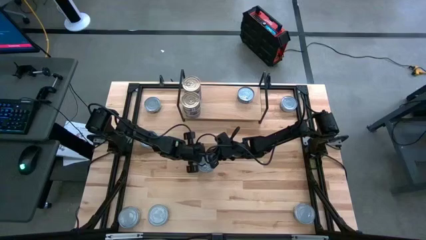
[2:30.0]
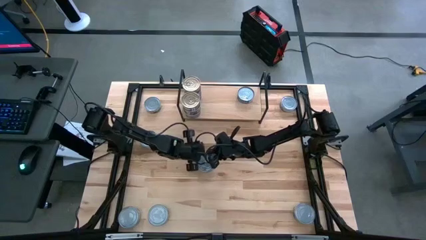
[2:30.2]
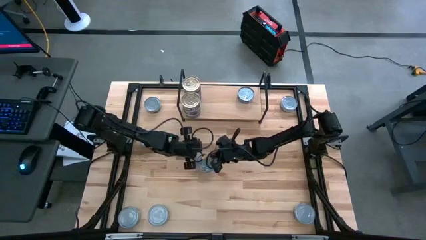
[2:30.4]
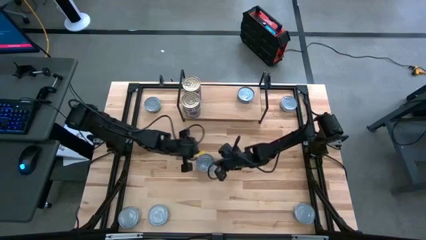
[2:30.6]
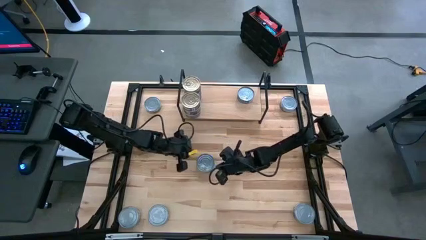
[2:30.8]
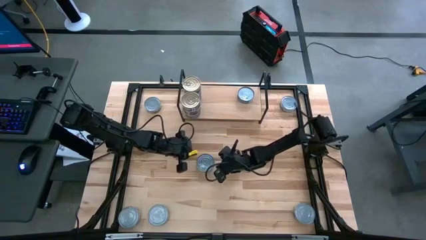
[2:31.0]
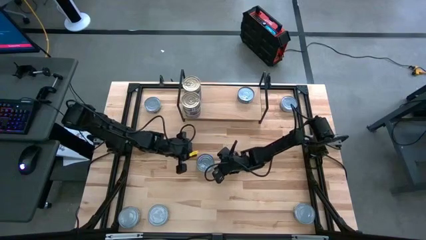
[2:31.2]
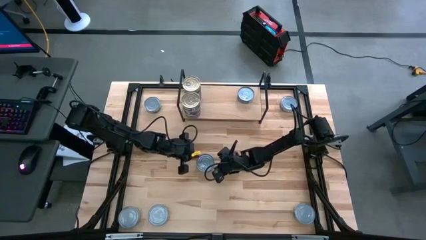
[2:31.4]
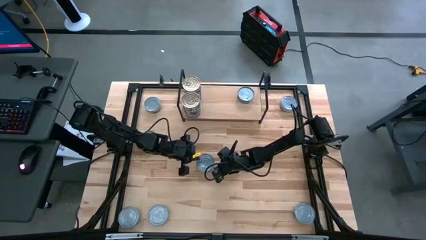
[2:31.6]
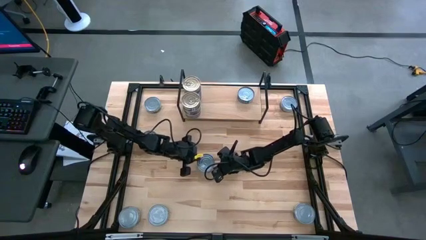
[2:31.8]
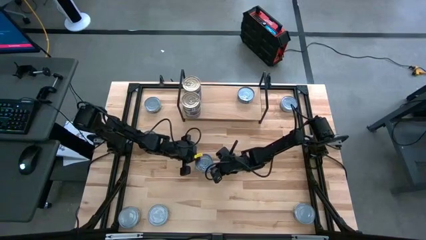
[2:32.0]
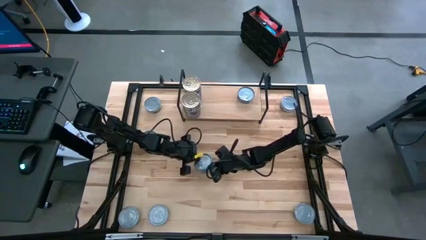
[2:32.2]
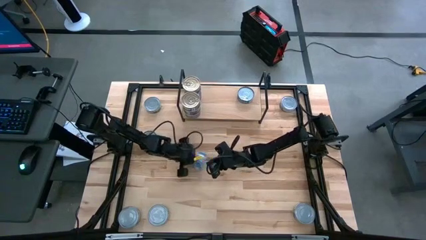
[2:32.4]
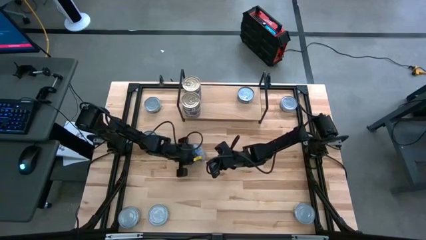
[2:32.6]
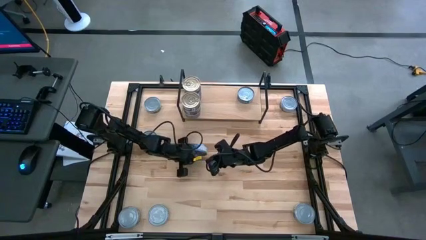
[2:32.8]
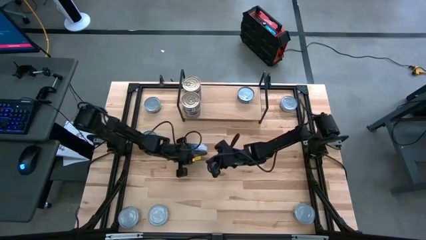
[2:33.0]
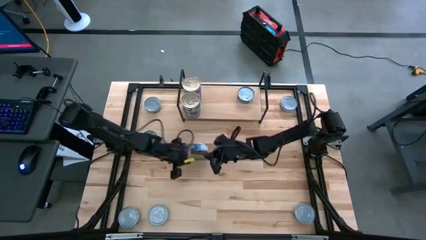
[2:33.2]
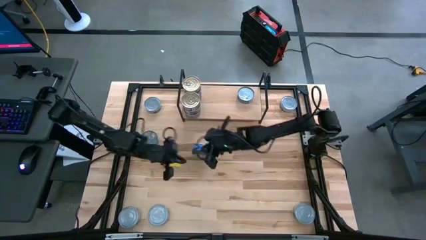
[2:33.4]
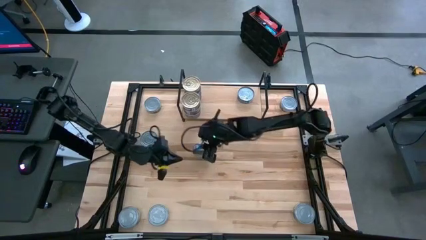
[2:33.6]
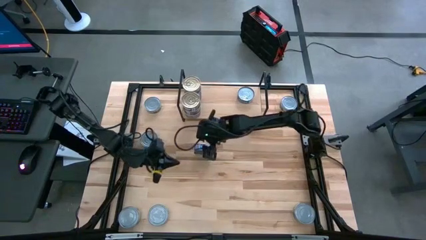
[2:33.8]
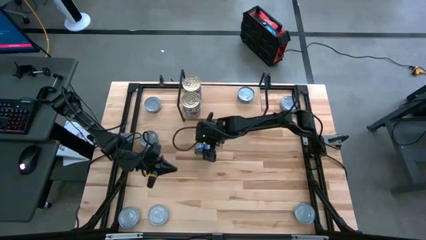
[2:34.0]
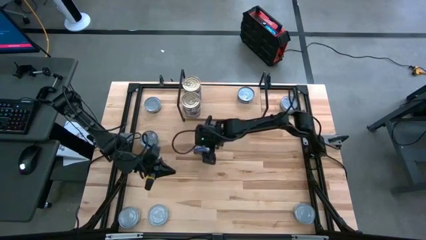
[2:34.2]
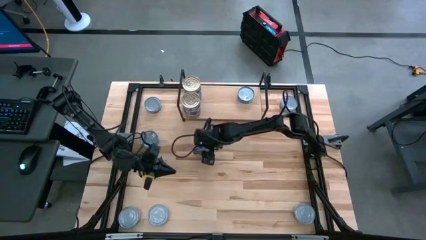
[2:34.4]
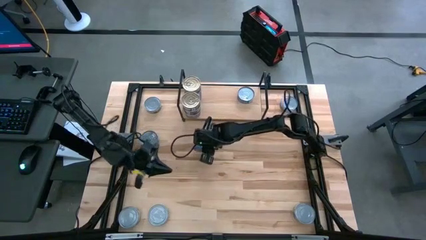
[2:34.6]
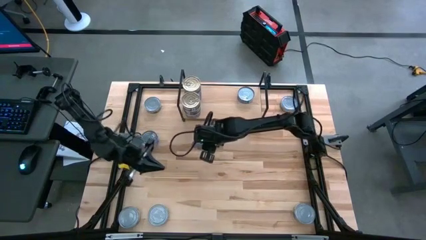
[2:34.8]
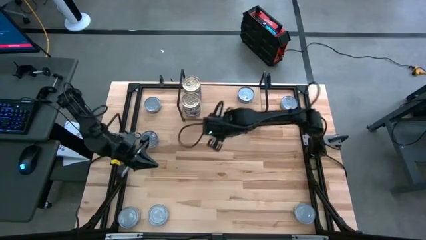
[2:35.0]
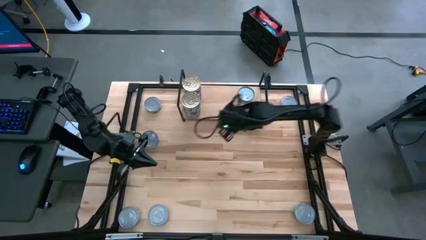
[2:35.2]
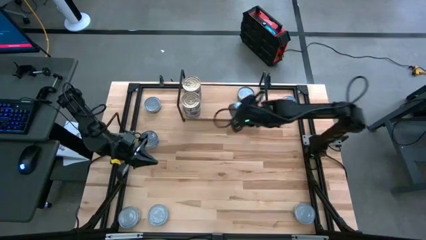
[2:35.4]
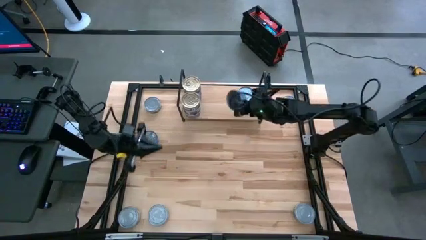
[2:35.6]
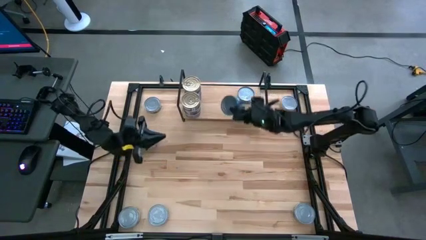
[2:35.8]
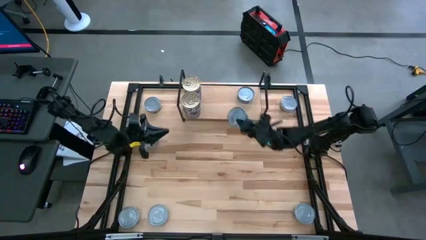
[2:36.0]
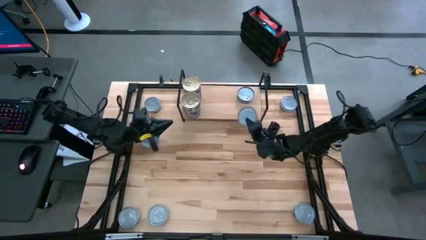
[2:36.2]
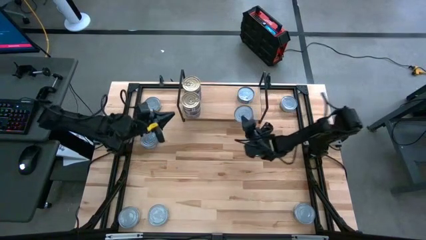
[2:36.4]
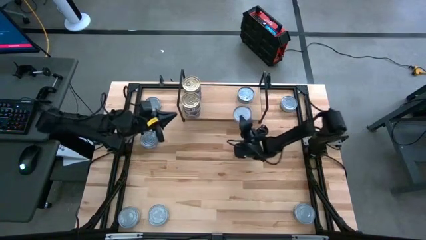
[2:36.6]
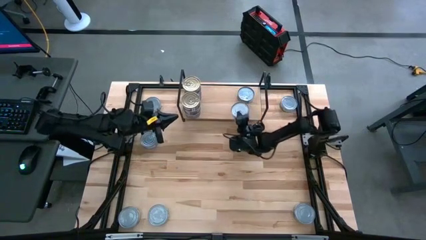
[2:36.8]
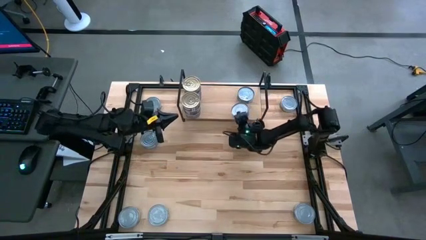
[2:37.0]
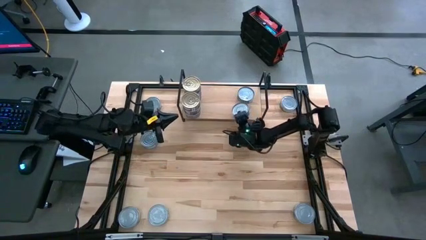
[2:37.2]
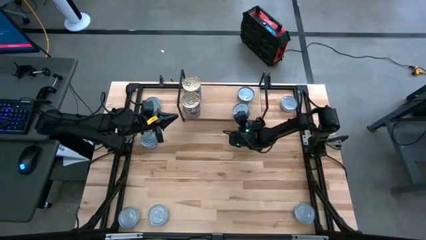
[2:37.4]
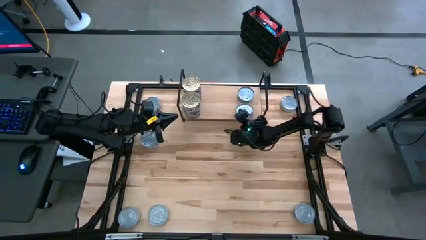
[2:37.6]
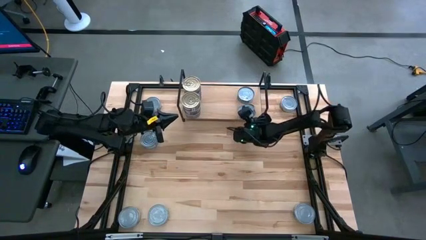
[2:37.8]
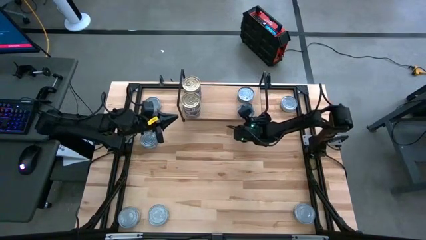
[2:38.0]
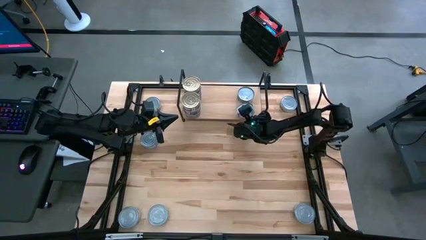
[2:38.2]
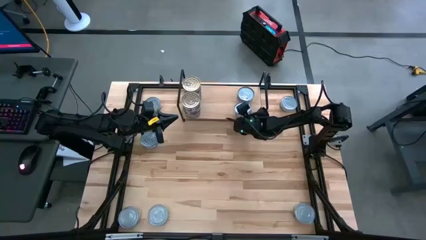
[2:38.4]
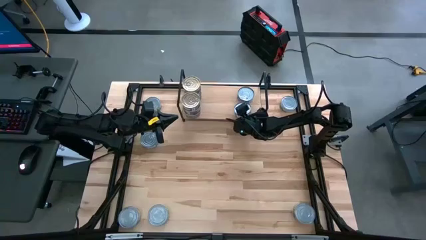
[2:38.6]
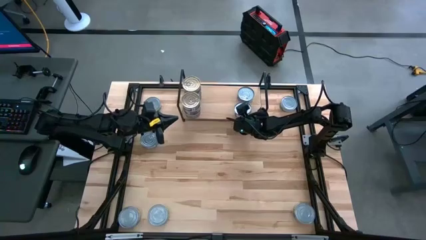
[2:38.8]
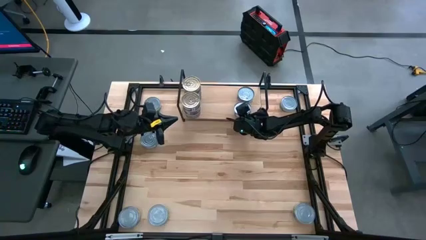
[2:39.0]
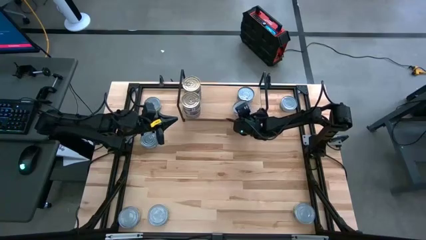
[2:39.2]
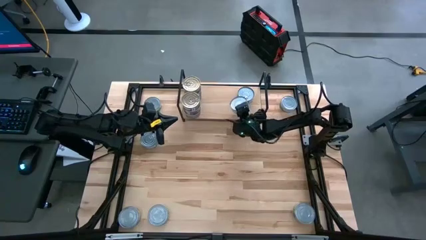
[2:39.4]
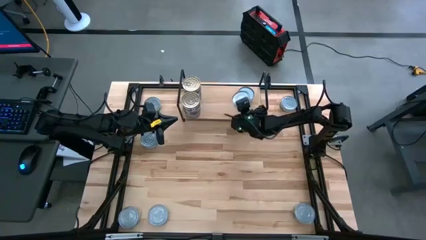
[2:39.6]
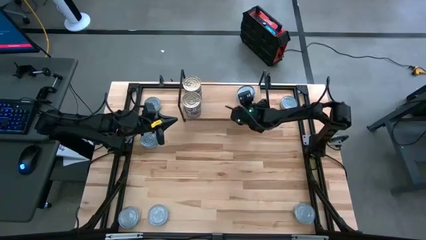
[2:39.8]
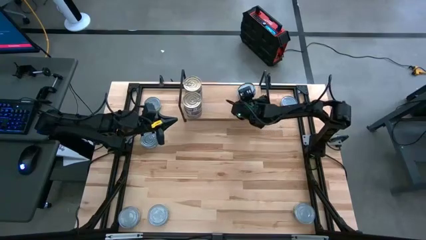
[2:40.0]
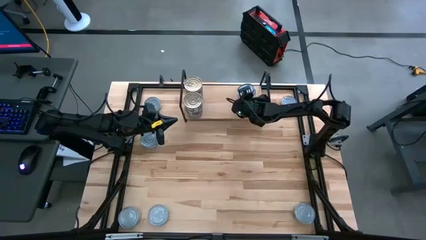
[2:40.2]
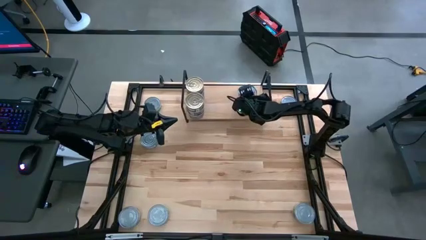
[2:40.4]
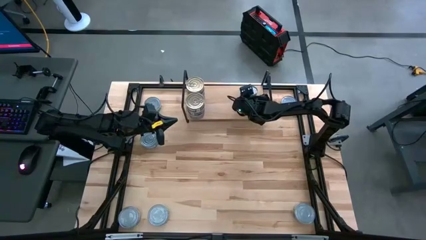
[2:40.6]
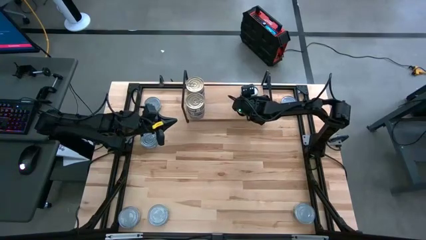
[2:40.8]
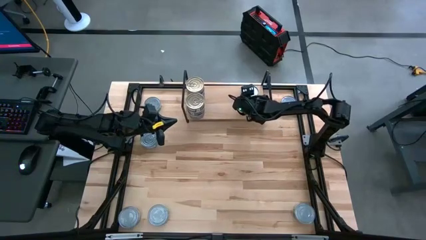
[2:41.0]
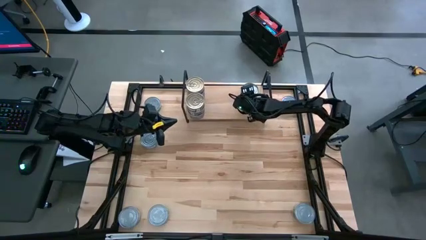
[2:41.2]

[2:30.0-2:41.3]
Task: Stack canned seafood by type on shelf
Stack the blue tuna can on top of the other blue tuna can on the shelf

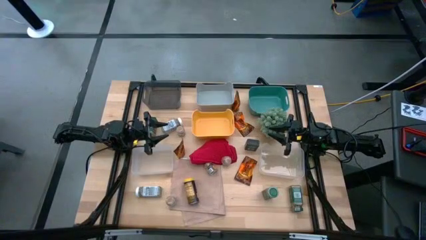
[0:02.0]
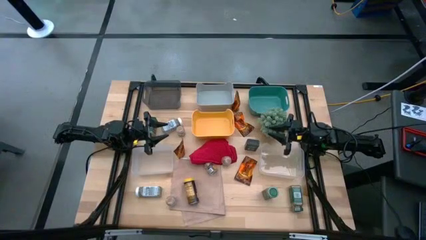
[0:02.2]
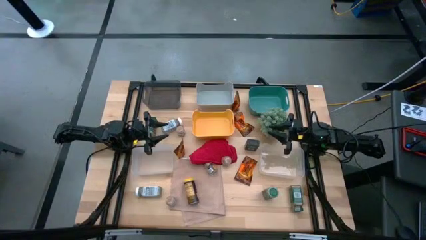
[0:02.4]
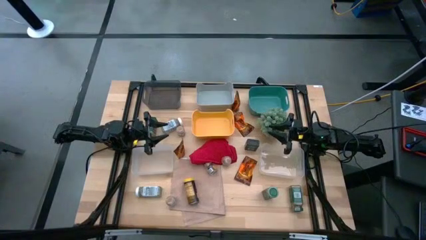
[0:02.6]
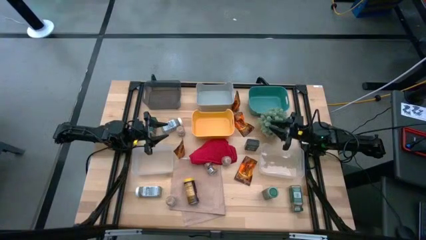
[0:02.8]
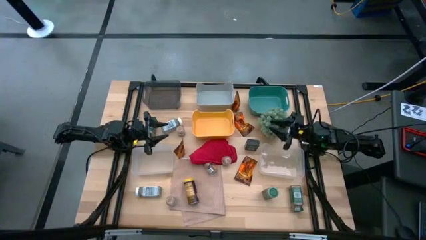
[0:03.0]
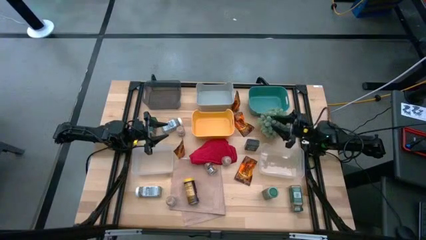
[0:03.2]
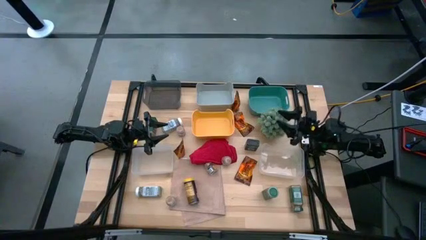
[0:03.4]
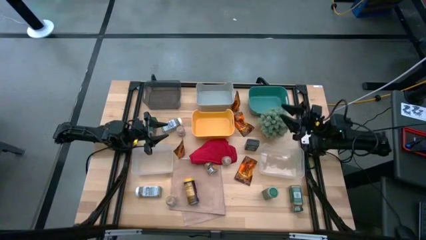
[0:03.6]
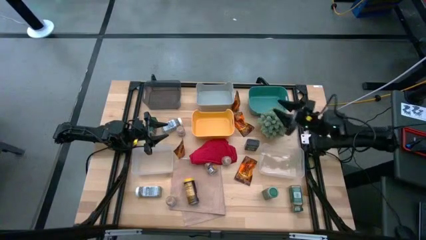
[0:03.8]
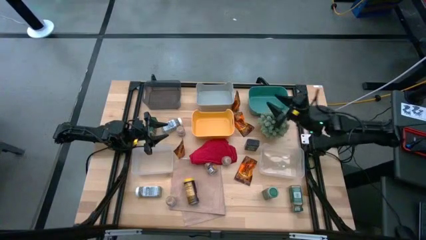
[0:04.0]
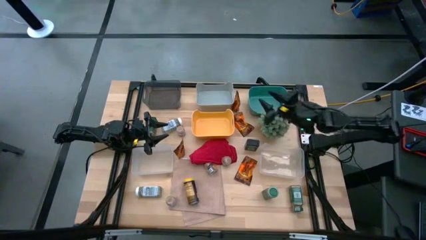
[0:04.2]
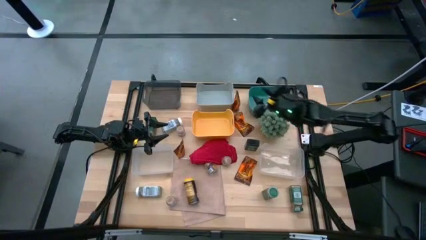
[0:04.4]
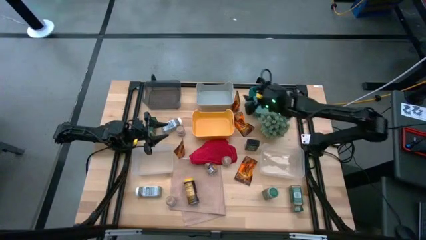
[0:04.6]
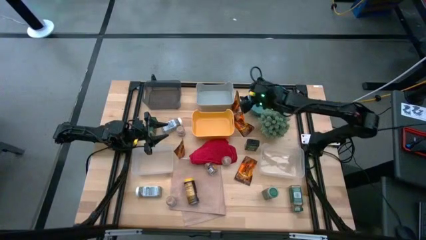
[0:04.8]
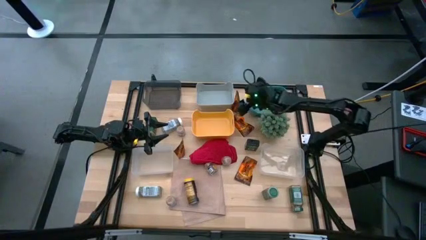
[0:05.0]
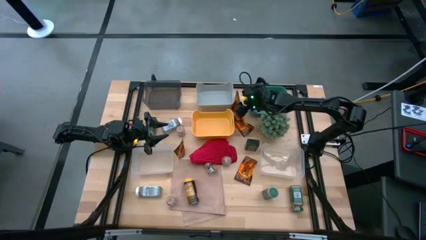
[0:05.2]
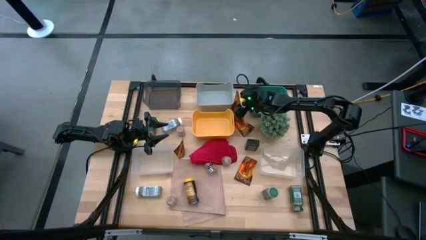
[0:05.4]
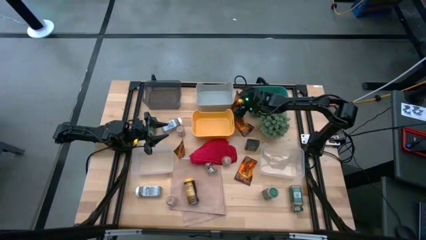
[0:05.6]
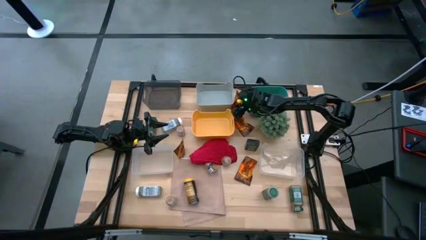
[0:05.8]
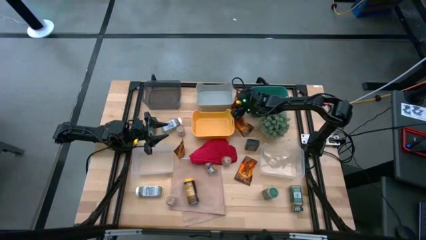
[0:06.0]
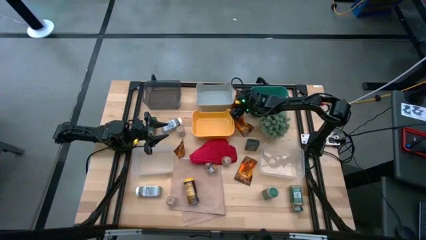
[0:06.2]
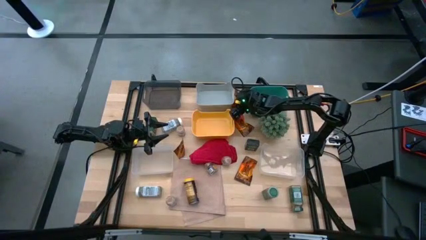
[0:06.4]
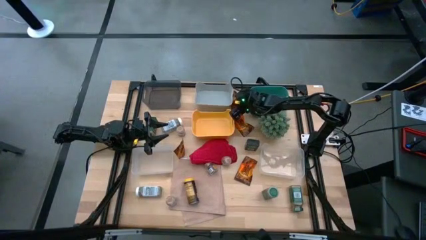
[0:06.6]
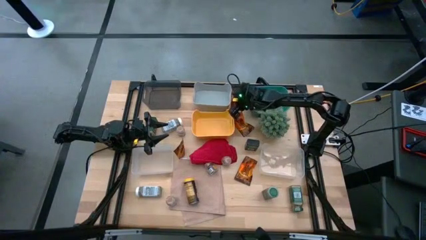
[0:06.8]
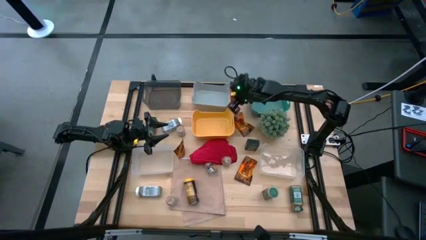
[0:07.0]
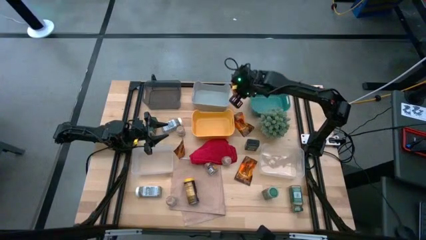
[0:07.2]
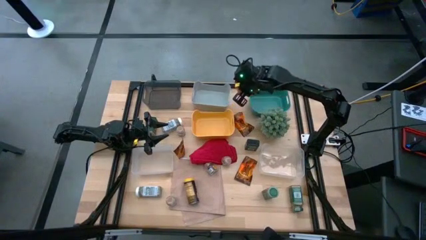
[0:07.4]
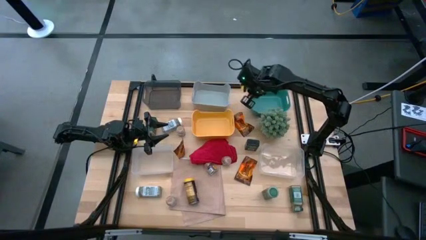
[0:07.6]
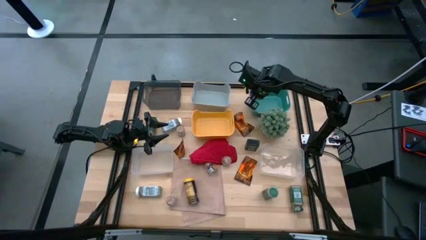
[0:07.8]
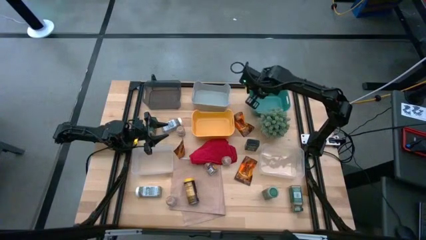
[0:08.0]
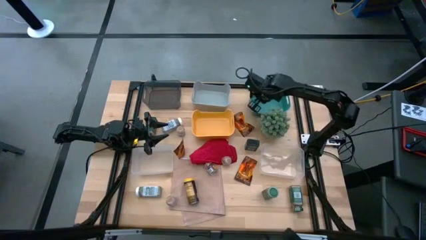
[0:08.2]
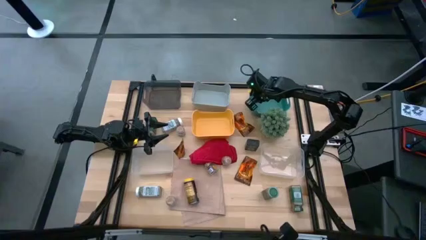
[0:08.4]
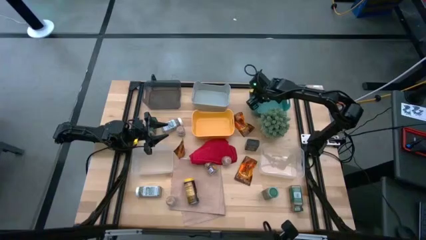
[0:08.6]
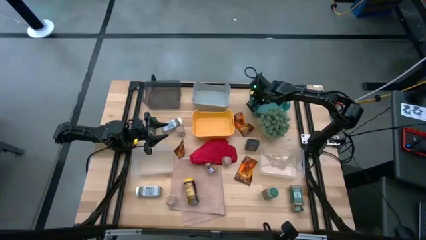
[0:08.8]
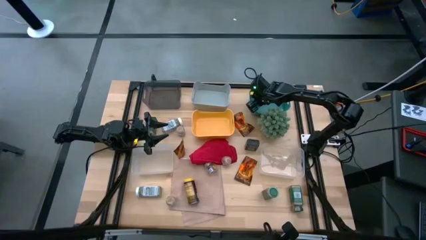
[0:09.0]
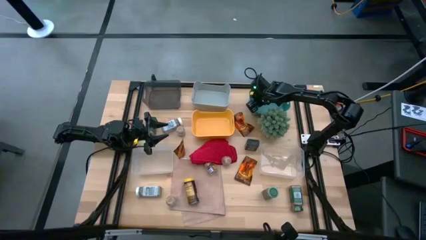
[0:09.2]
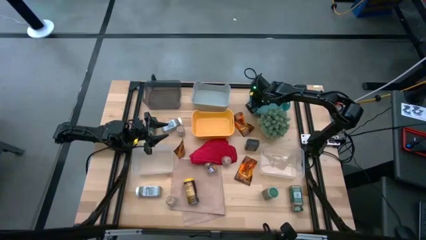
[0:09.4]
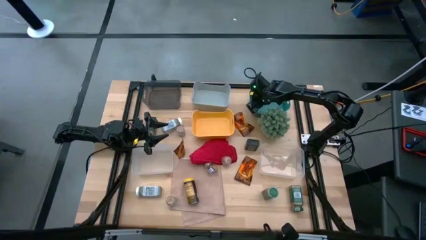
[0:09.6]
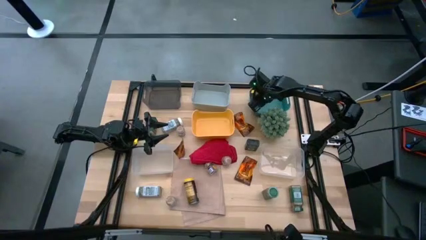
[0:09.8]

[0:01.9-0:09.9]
Task: Sort spices by type
Put the brown seasoning pack into the green bin
